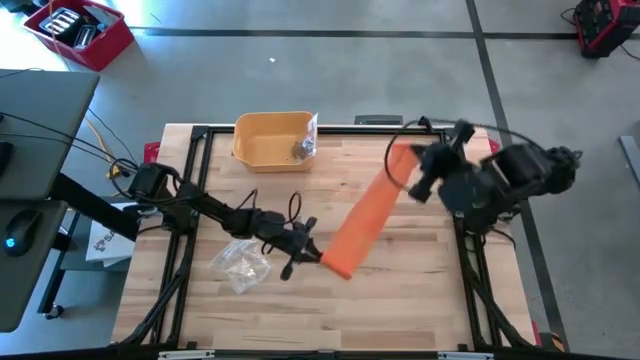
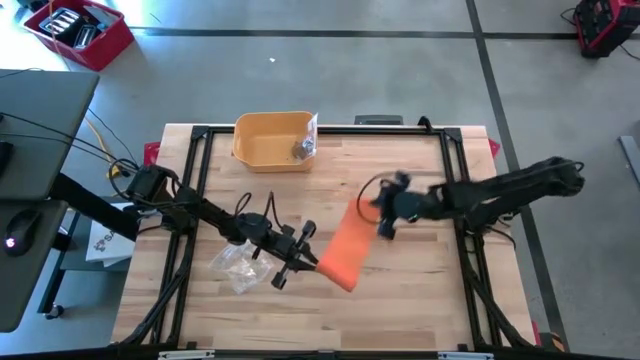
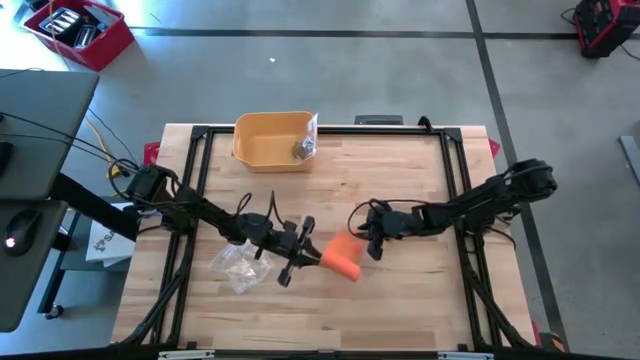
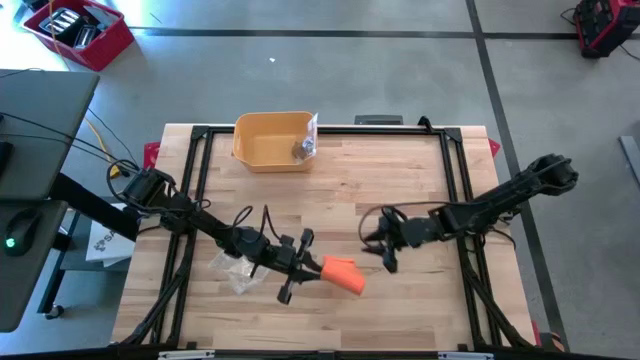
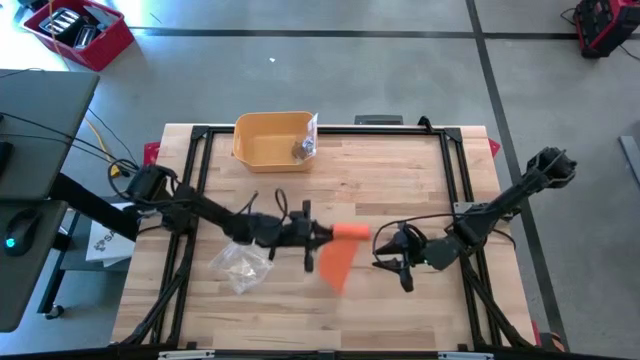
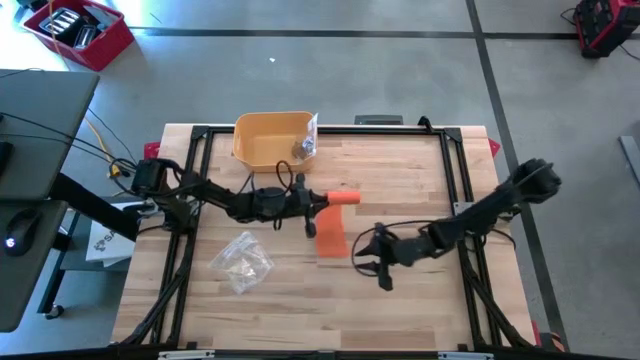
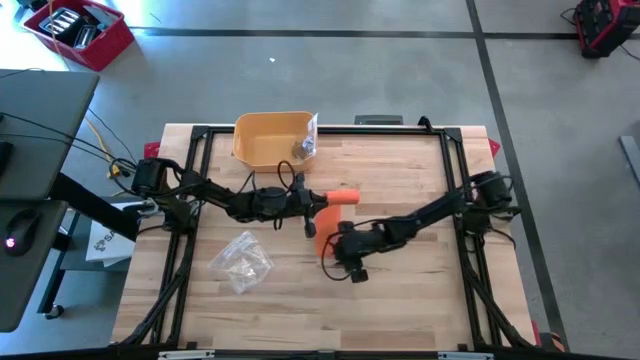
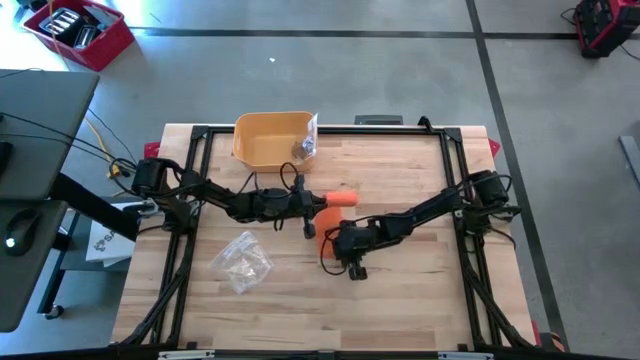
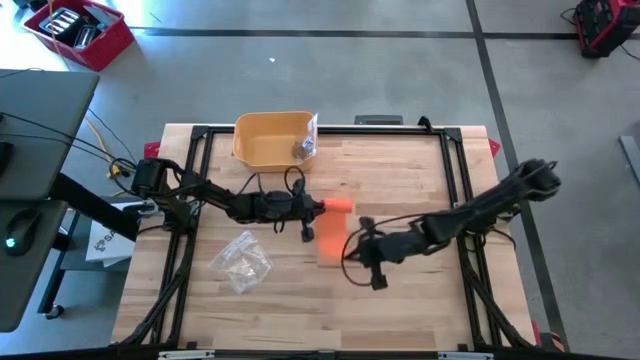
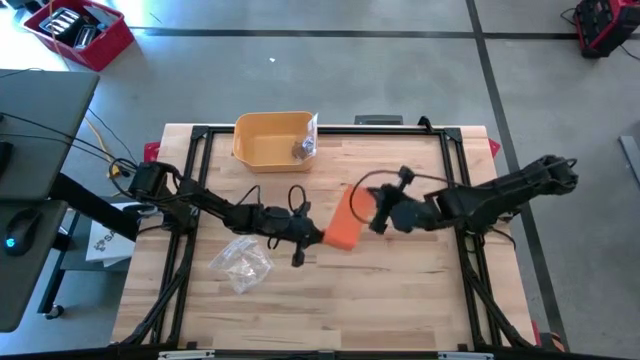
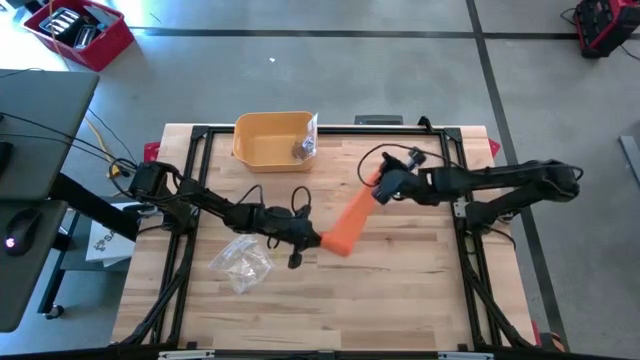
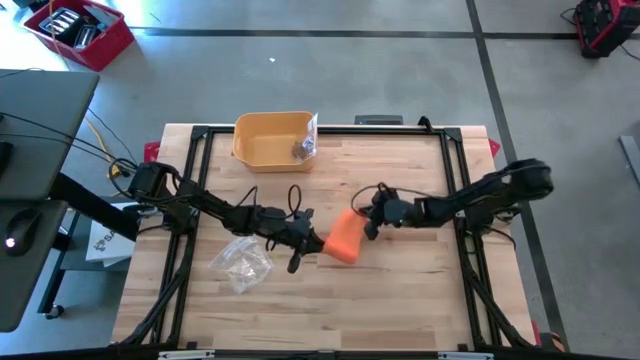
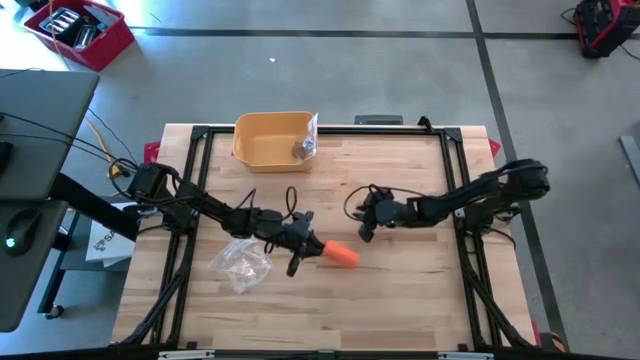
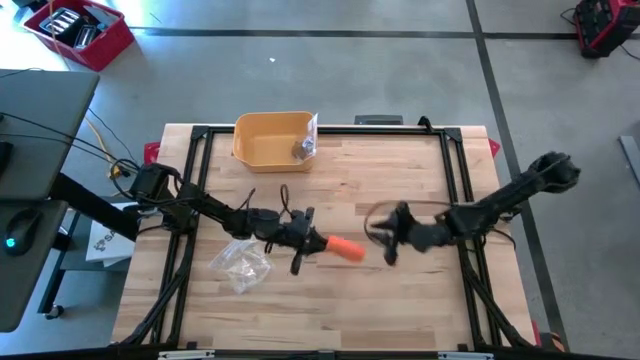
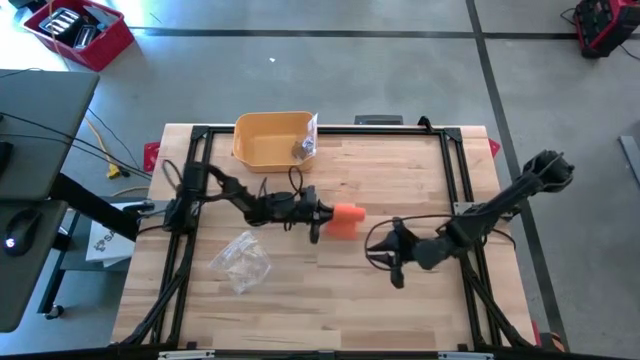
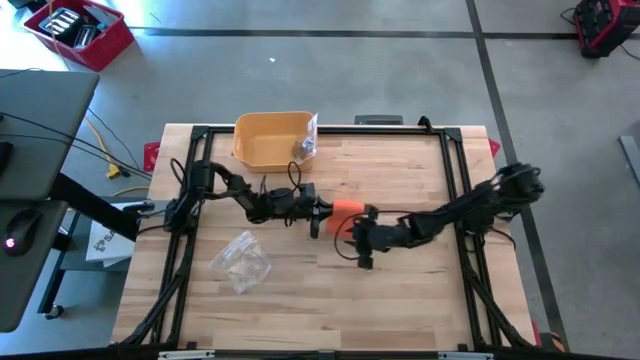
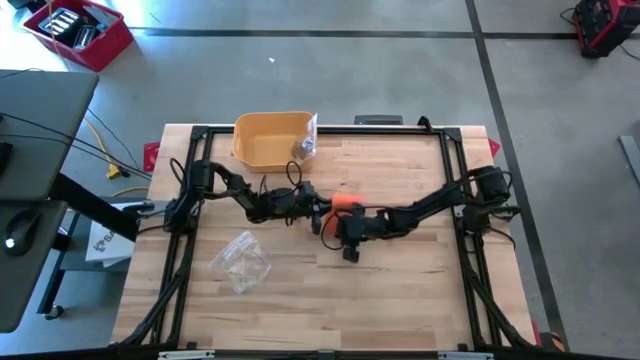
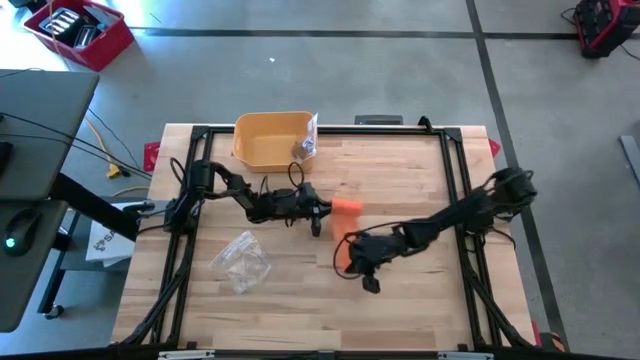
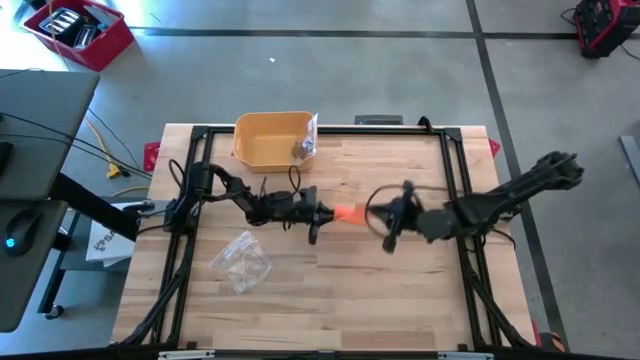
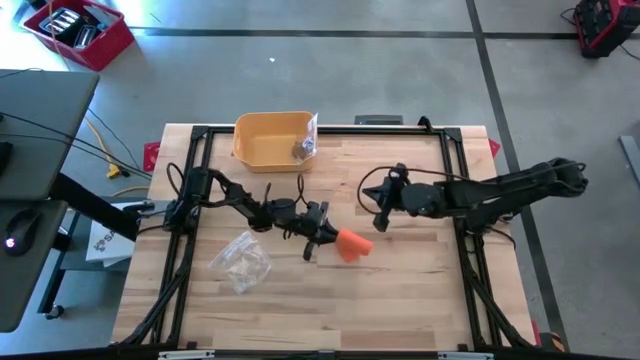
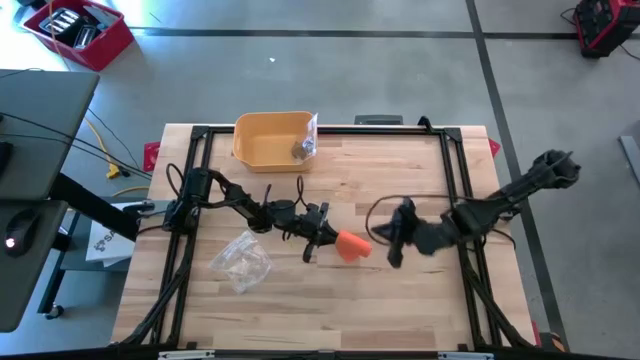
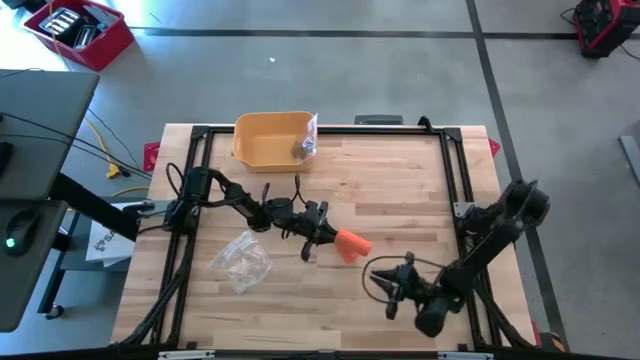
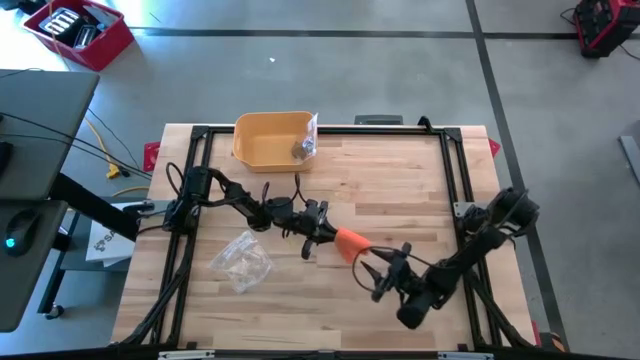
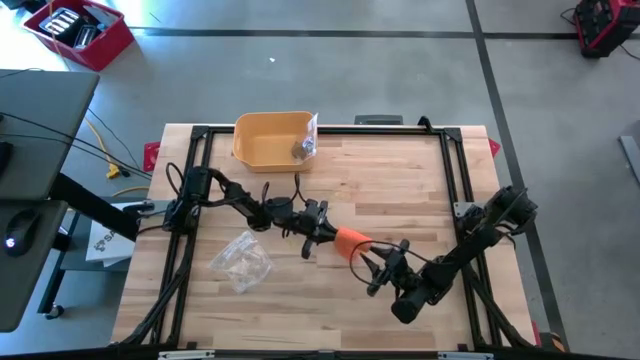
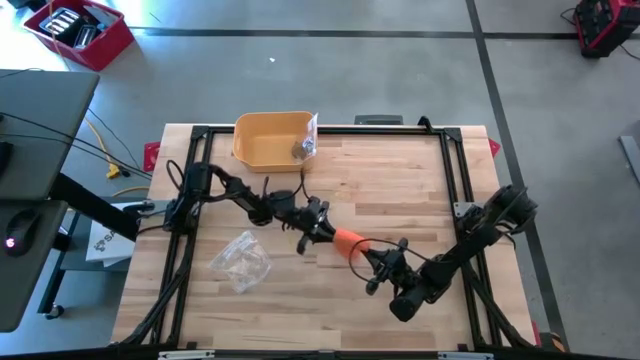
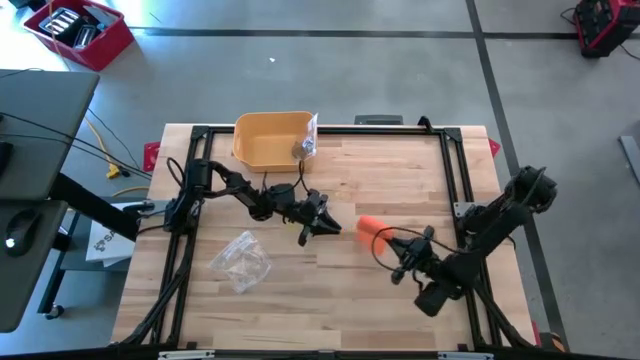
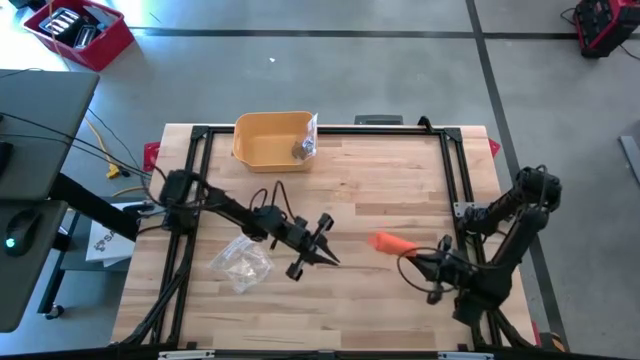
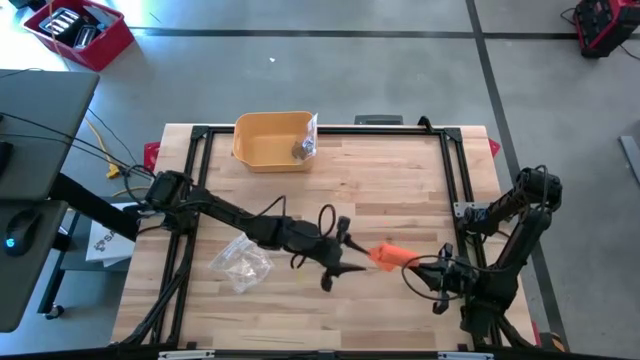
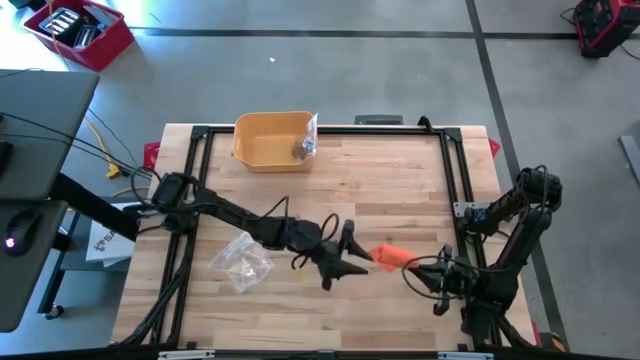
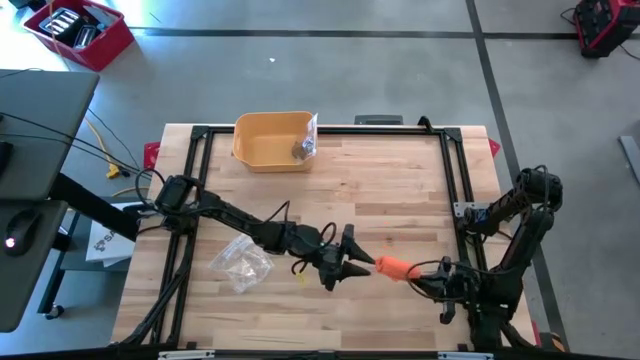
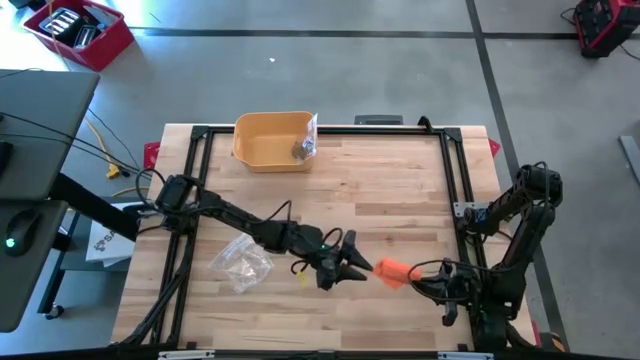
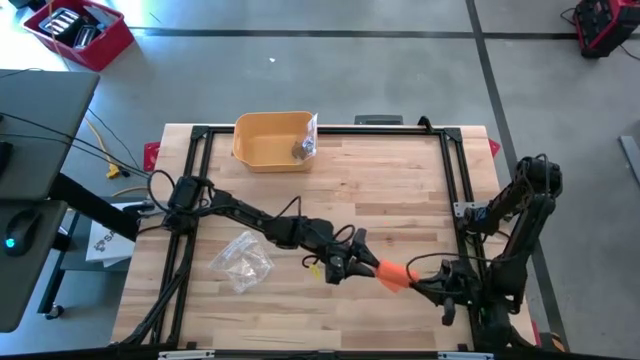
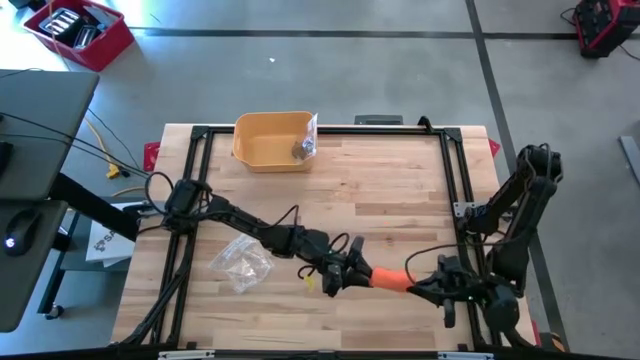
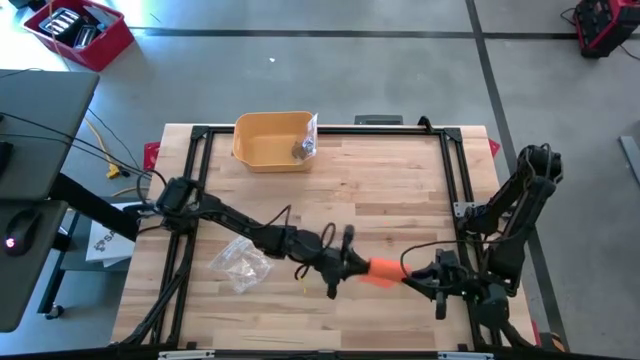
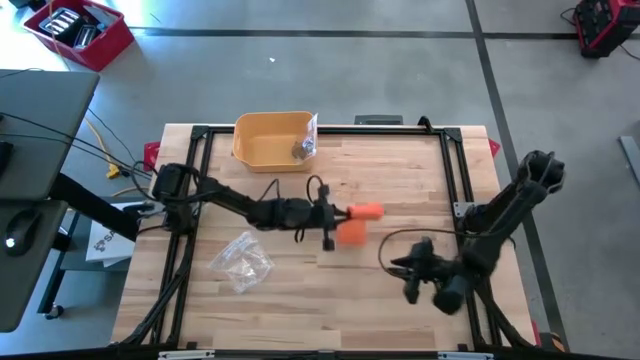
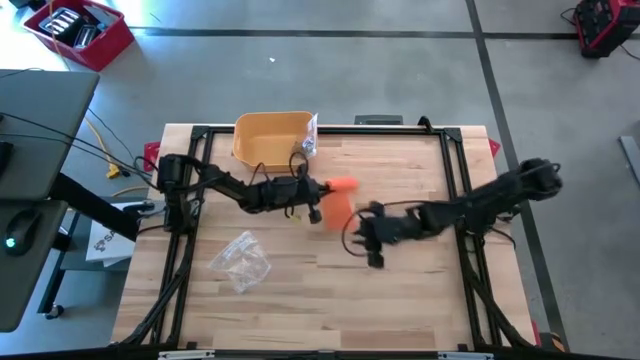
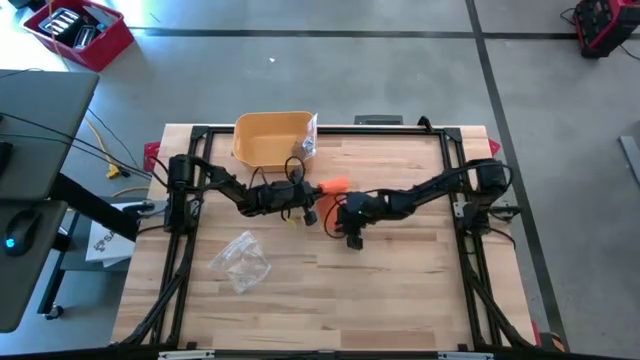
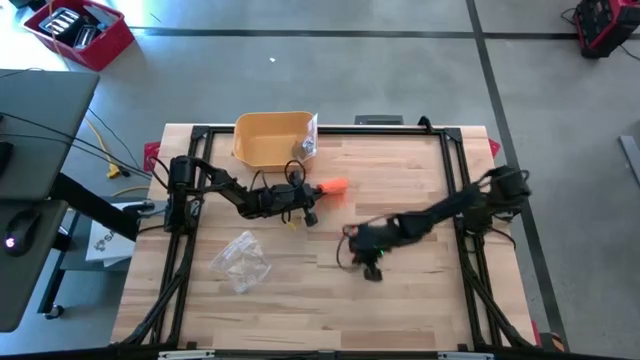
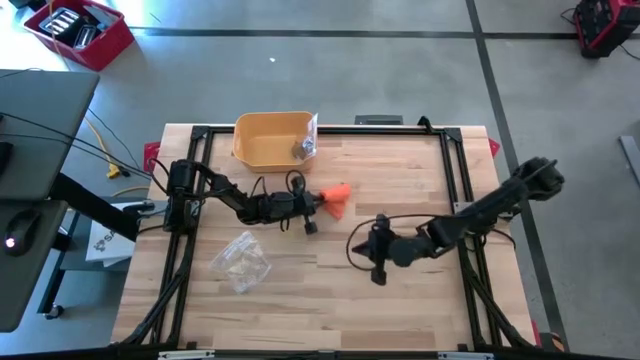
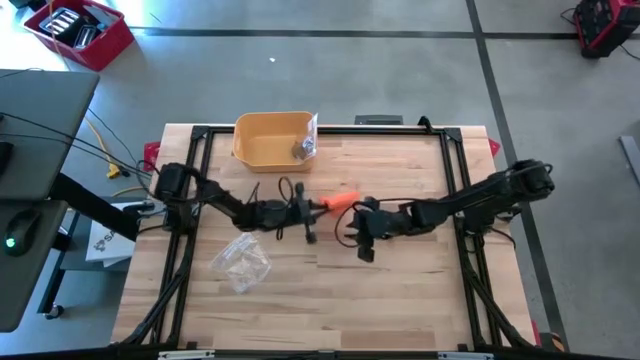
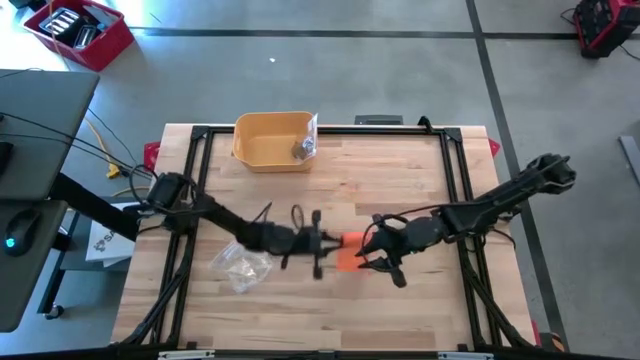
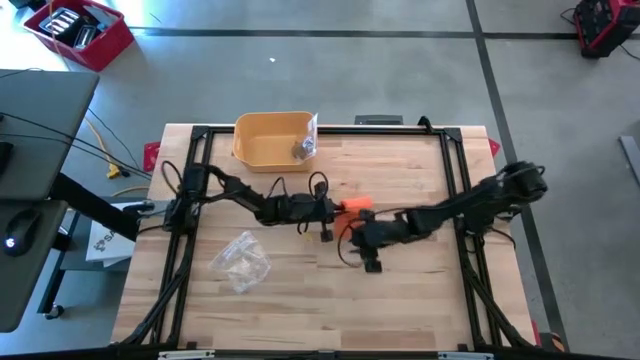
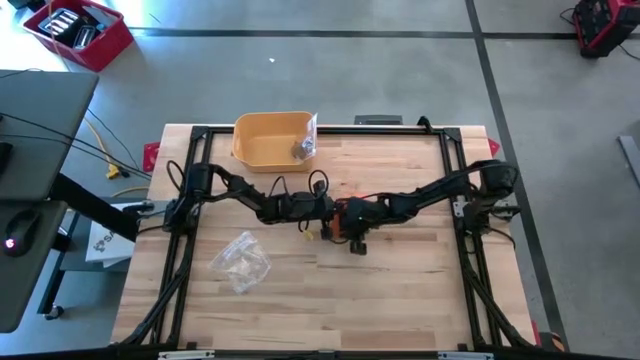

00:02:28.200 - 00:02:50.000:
Task: Roll bandage
Roll the orange bandage
